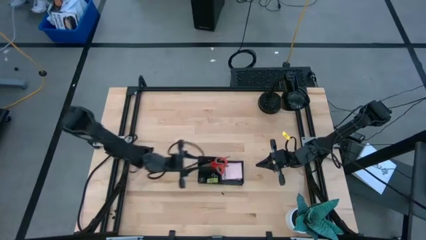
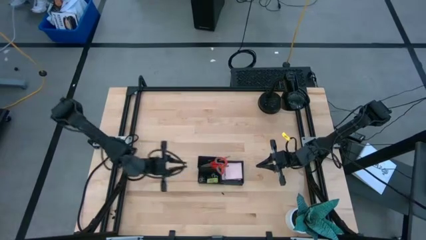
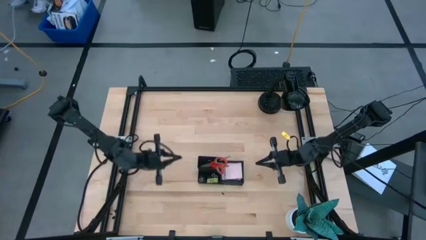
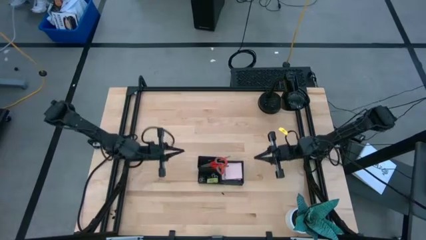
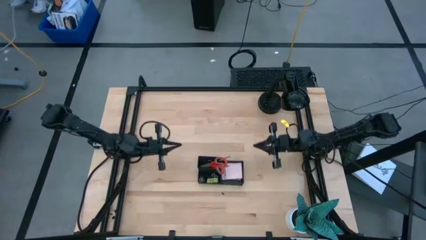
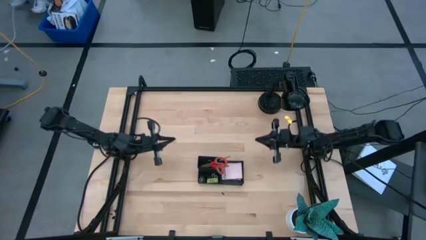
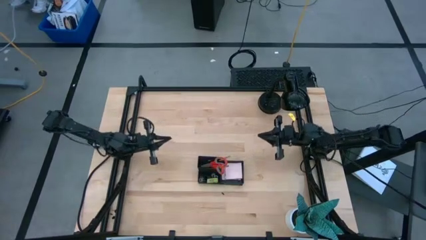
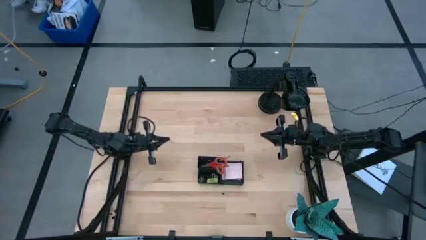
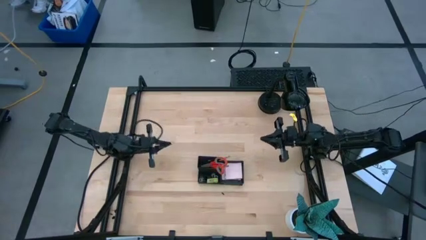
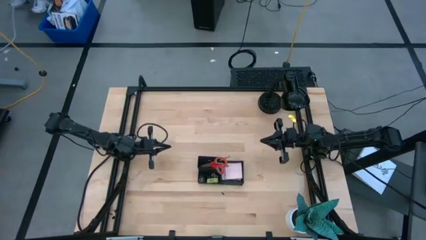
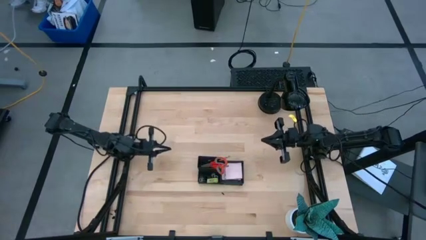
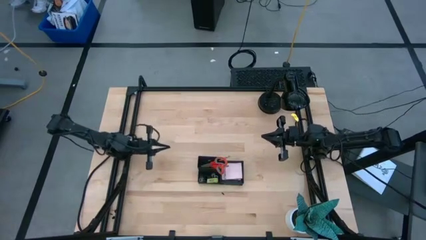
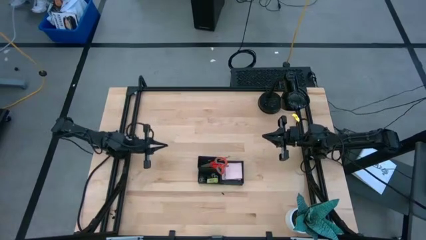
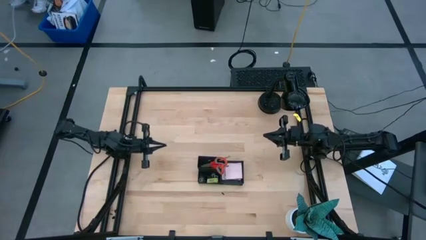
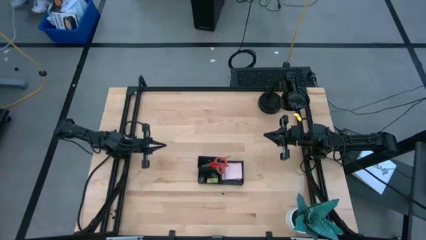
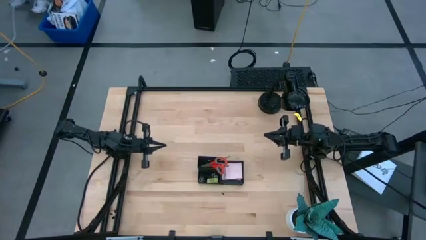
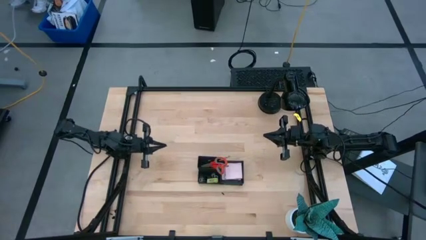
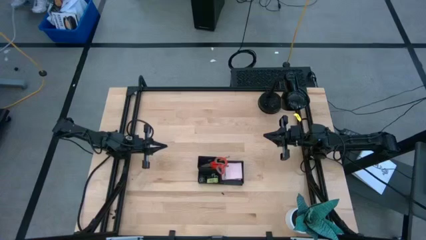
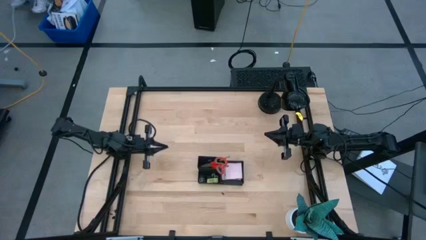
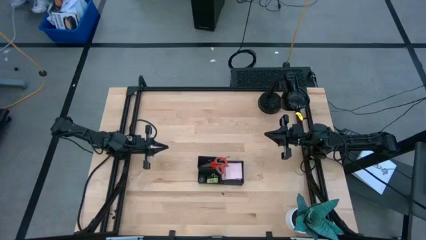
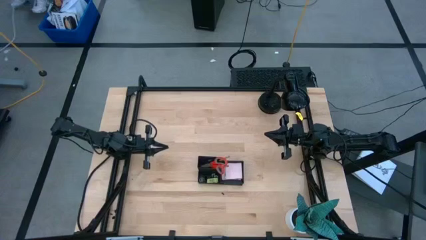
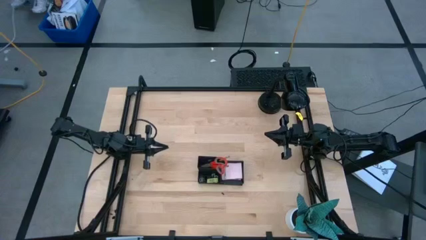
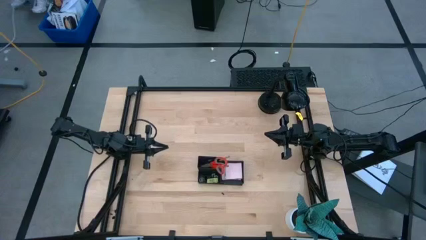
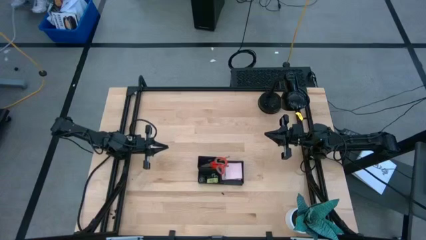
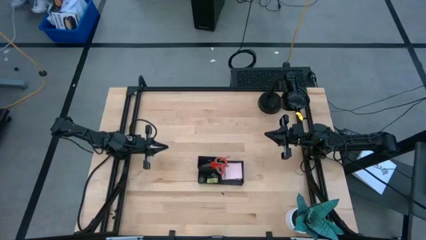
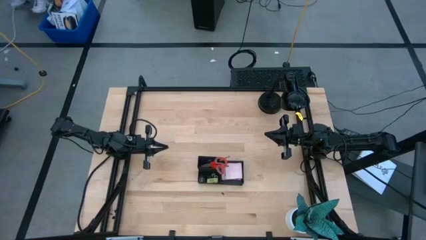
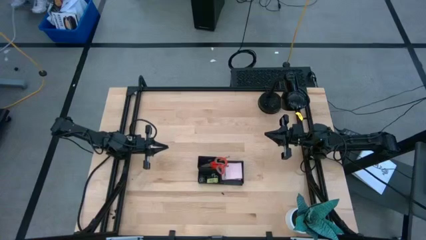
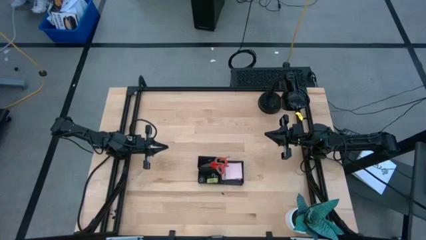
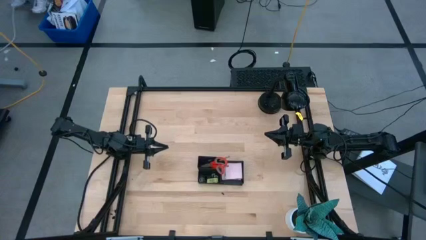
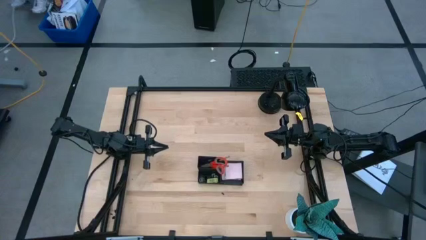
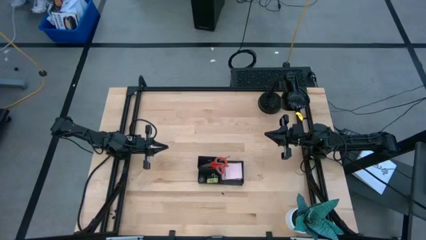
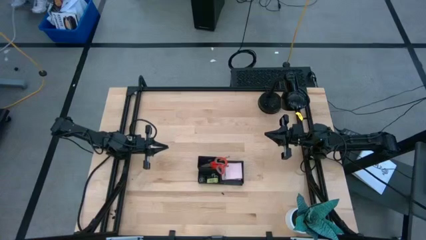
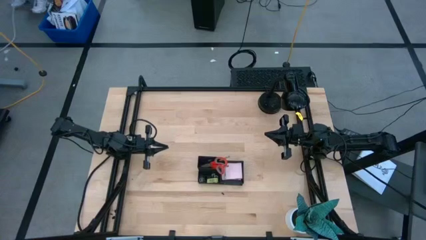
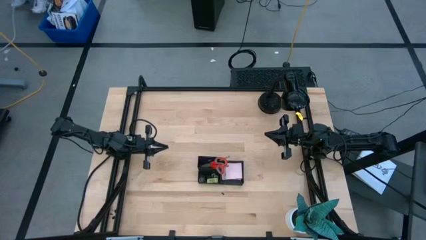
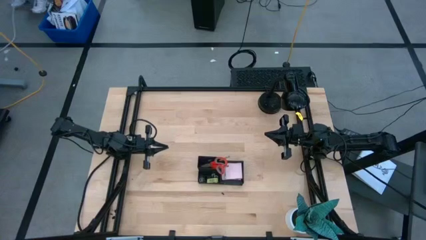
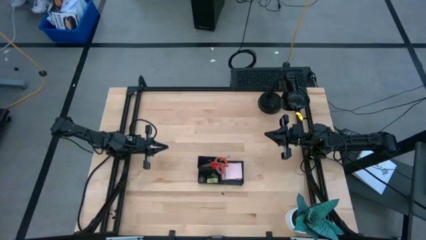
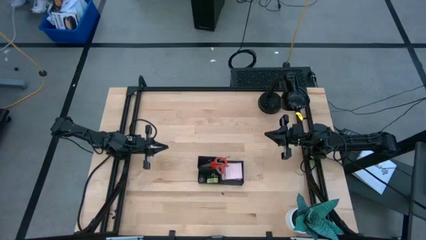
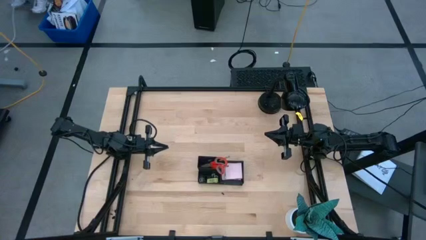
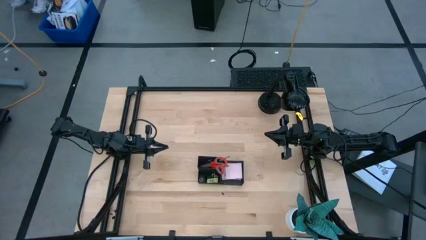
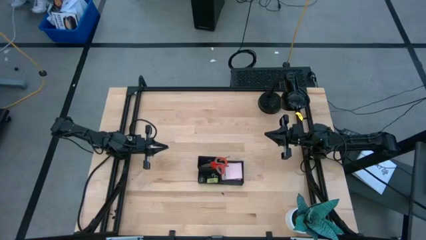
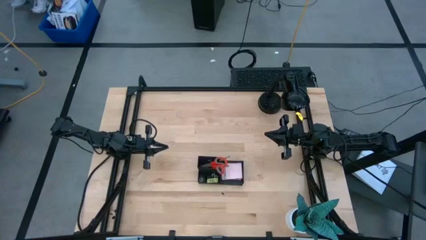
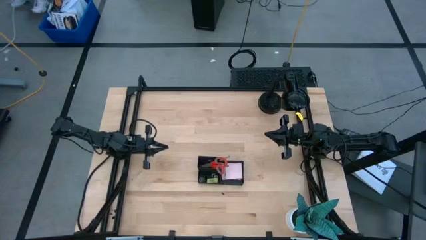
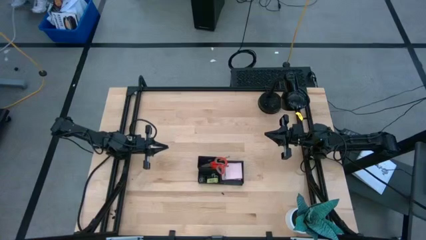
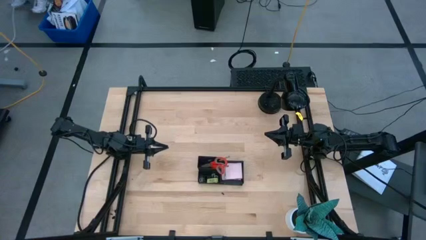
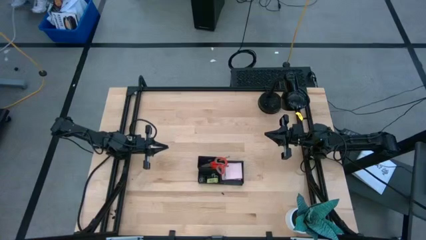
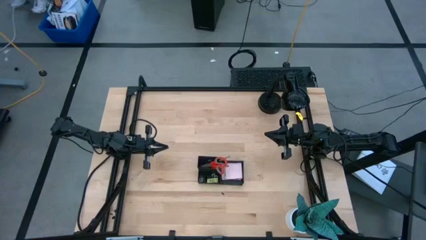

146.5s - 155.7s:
Task: Pick and place office supplies into organizer
Return to Home Position
